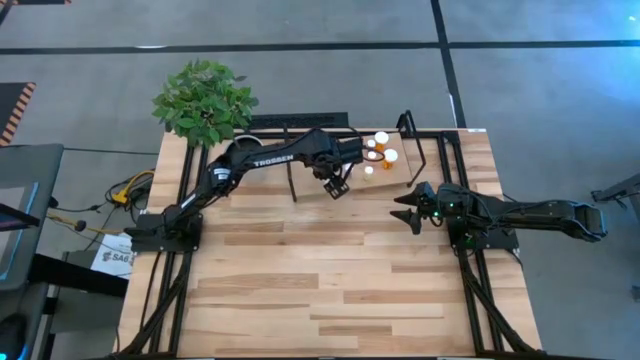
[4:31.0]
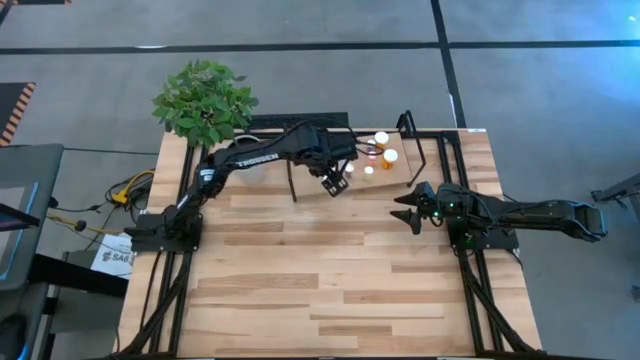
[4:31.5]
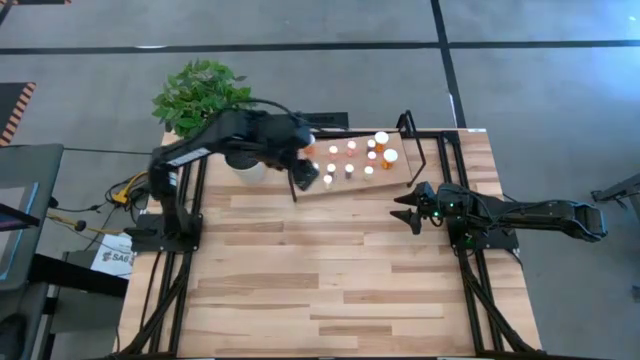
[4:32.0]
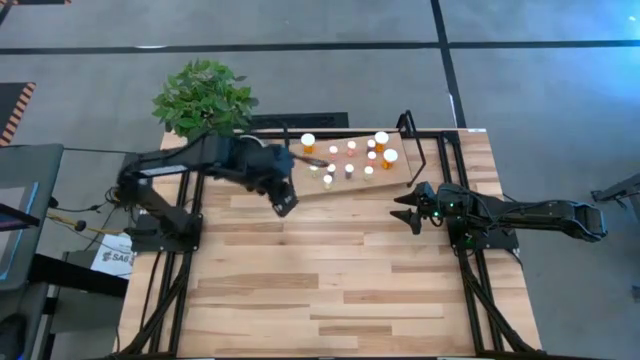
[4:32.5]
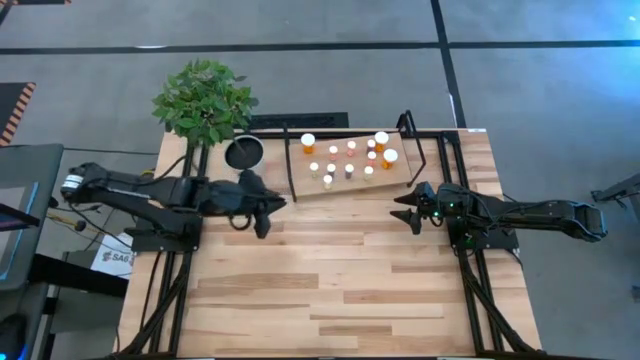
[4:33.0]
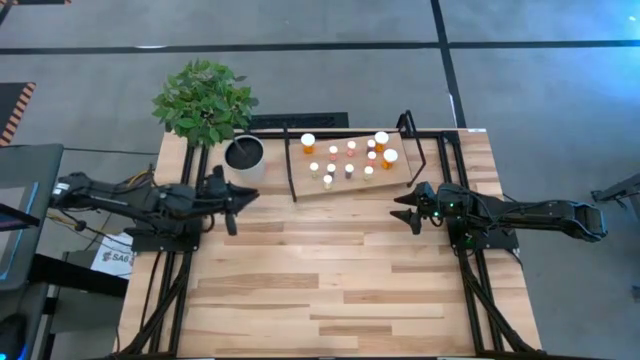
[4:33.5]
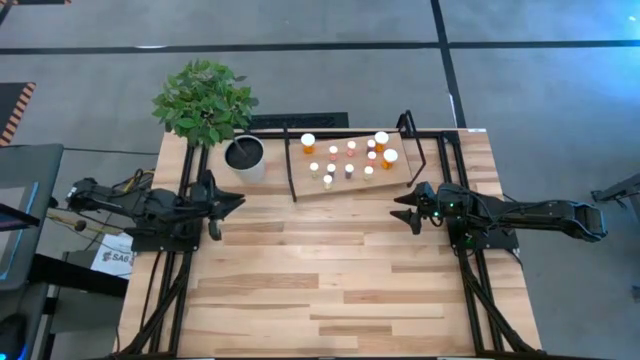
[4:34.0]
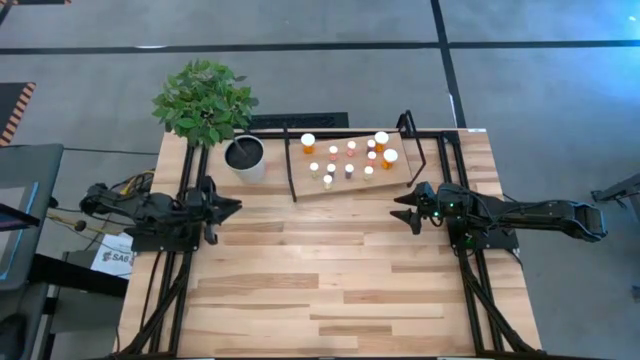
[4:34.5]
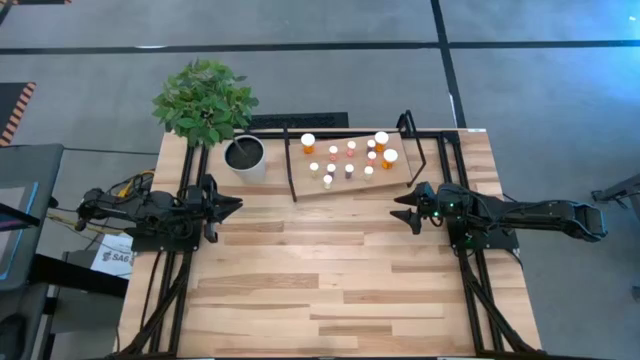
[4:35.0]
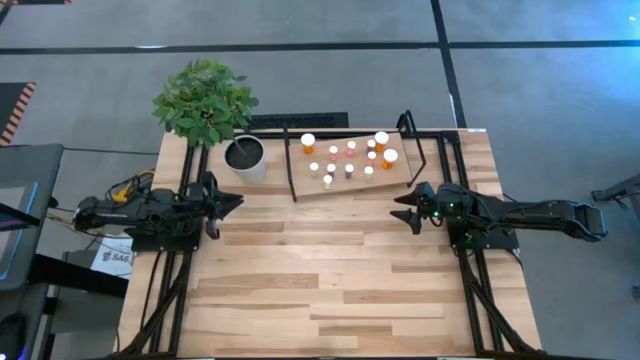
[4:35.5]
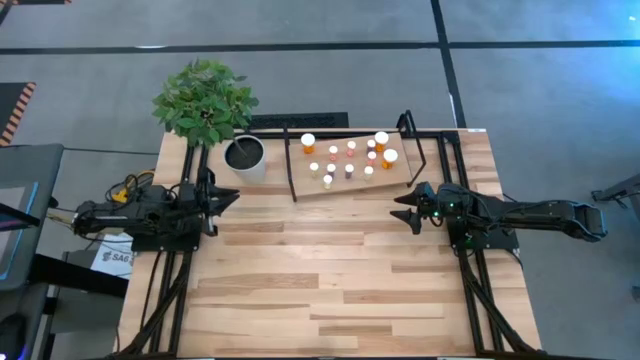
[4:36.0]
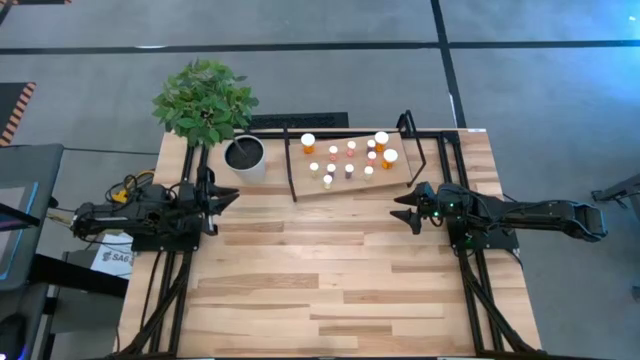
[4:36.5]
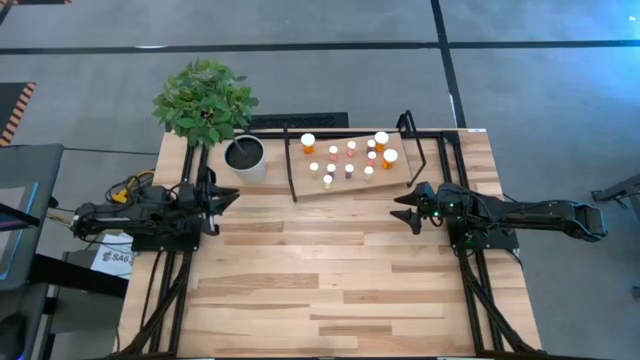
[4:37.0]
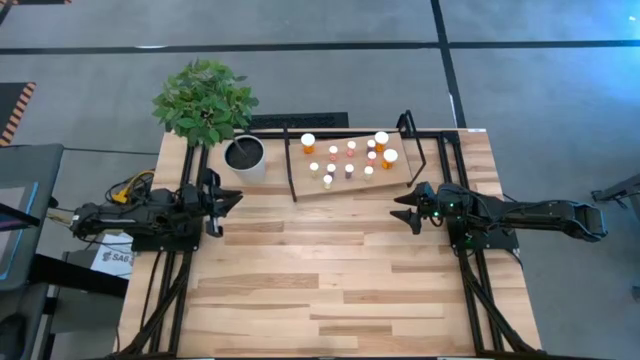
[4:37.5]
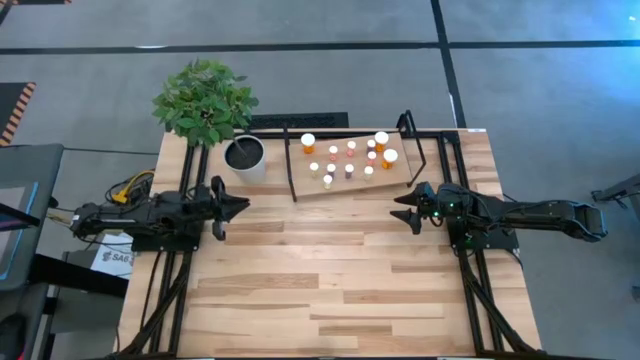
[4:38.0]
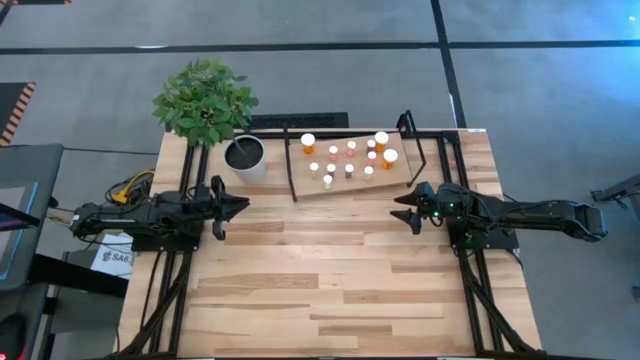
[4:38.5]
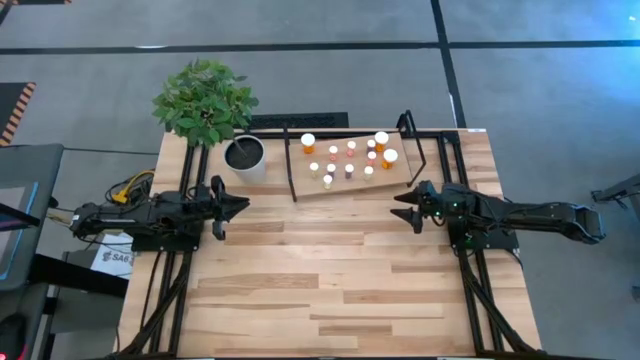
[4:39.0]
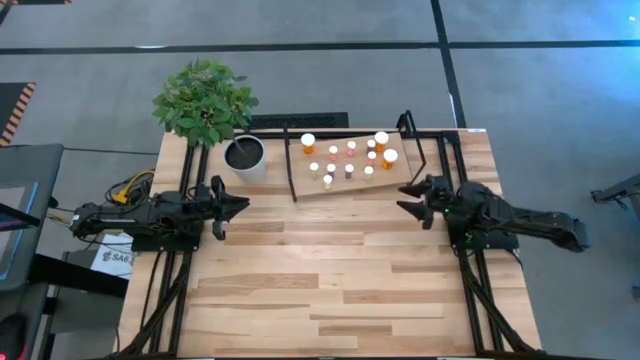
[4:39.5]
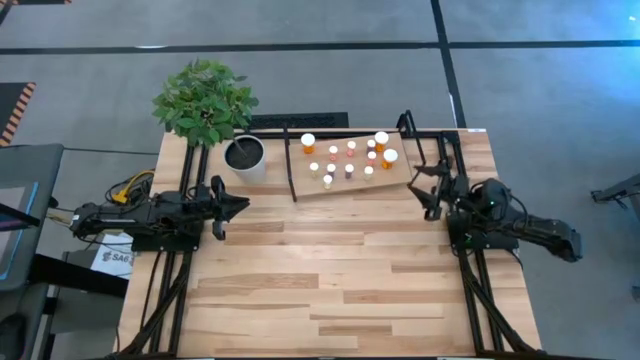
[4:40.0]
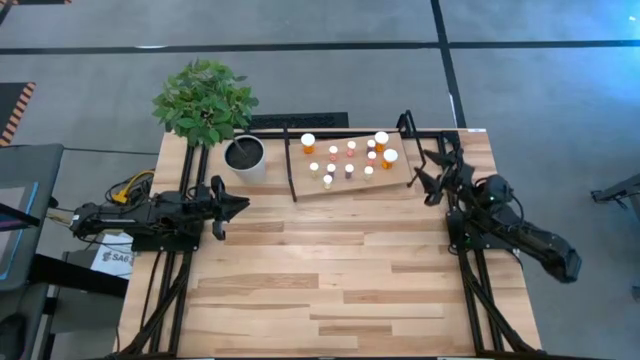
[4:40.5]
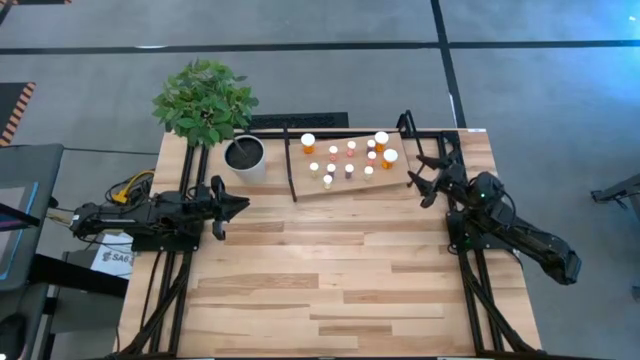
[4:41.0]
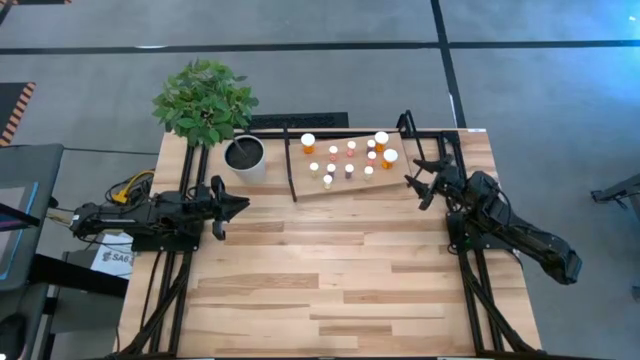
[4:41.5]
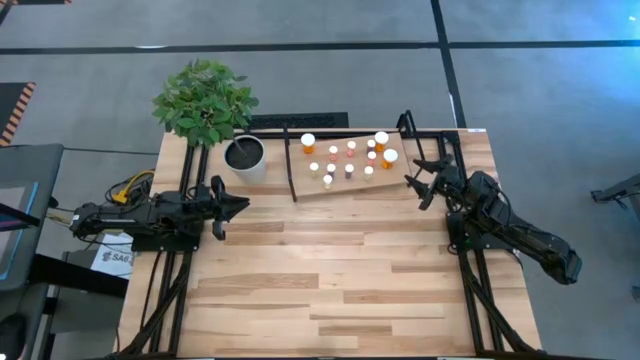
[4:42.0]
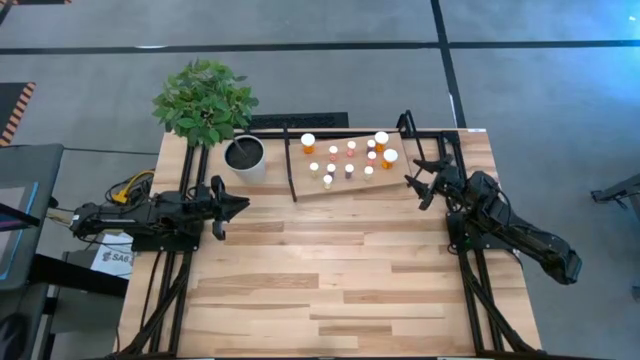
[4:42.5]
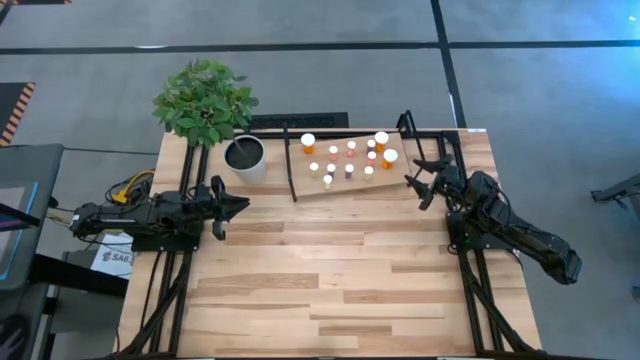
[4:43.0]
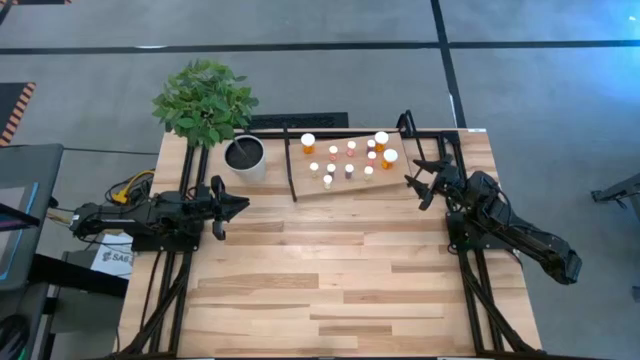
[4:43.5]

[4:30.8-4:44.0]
Task: Pick and place medicine bottles onto shelf by color
Return to Home Position

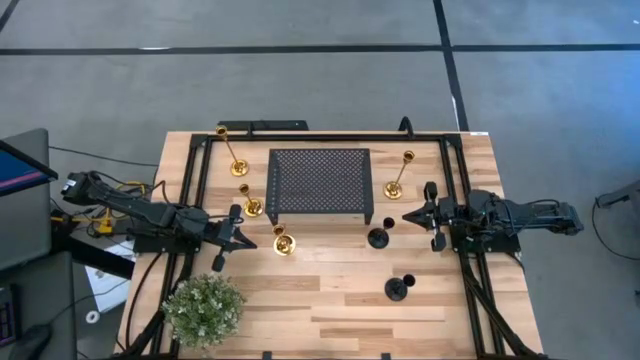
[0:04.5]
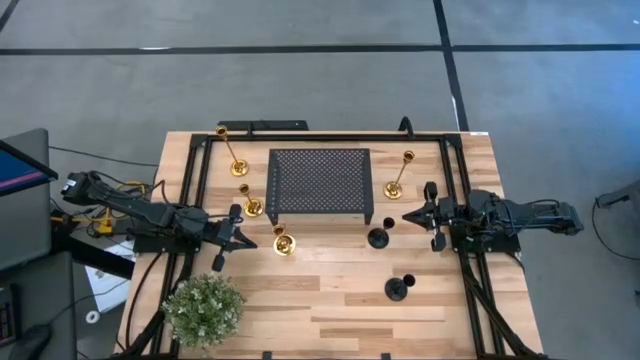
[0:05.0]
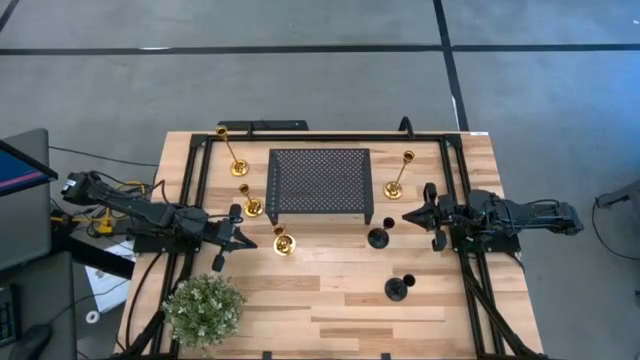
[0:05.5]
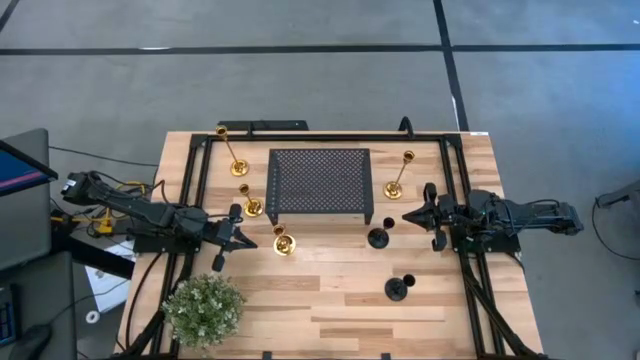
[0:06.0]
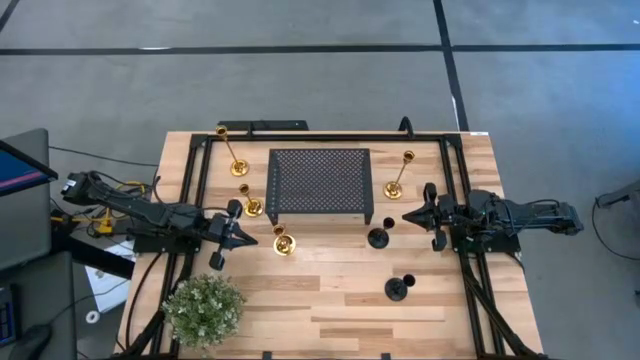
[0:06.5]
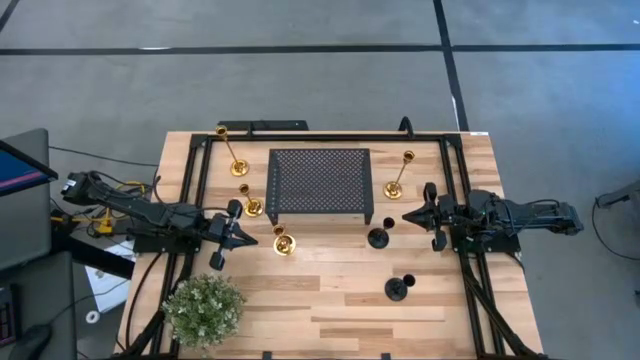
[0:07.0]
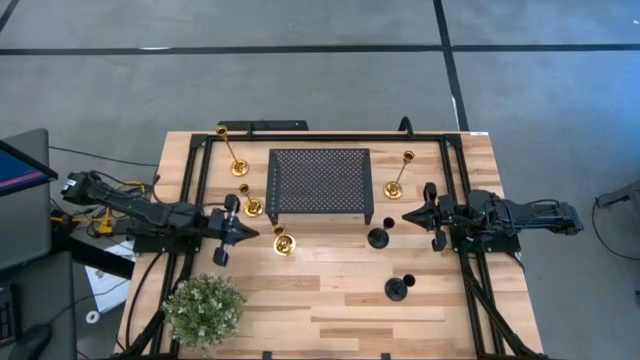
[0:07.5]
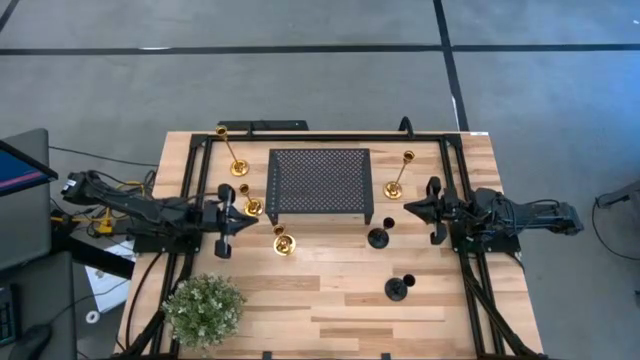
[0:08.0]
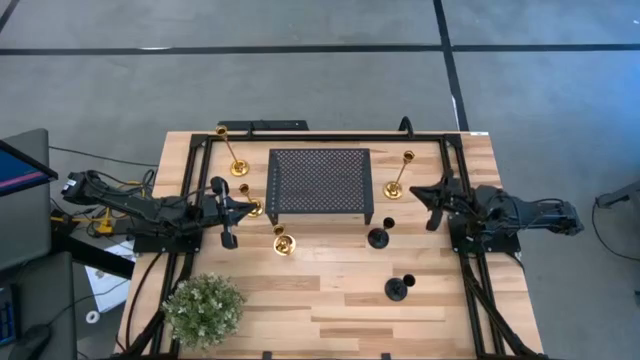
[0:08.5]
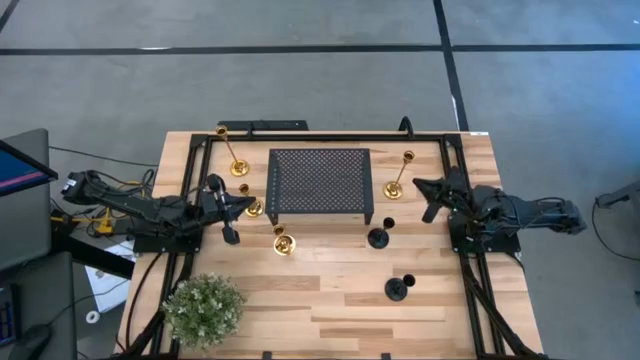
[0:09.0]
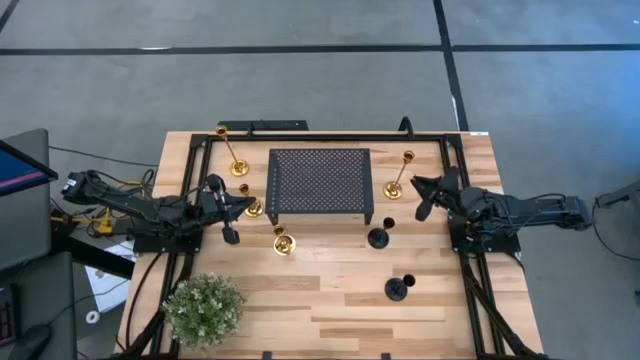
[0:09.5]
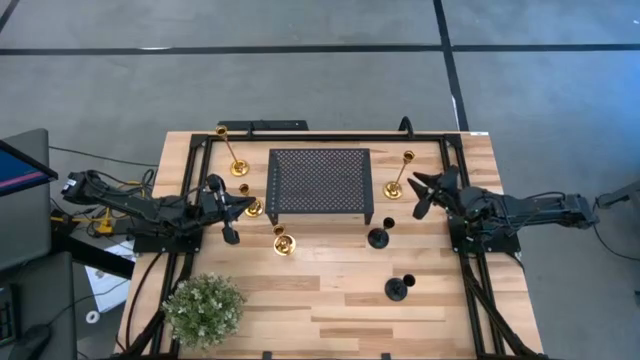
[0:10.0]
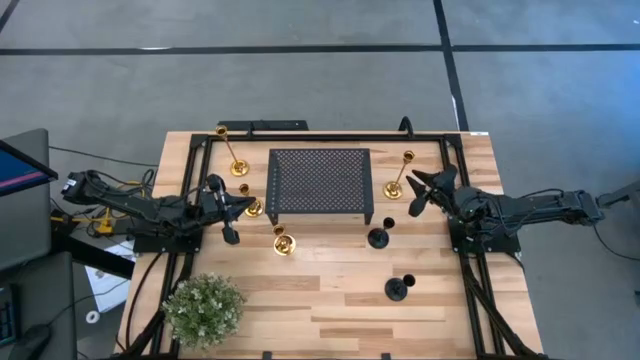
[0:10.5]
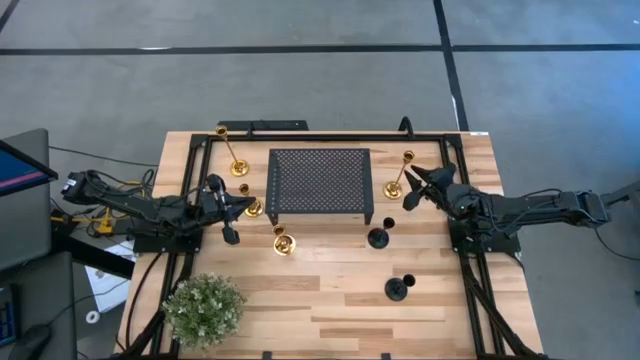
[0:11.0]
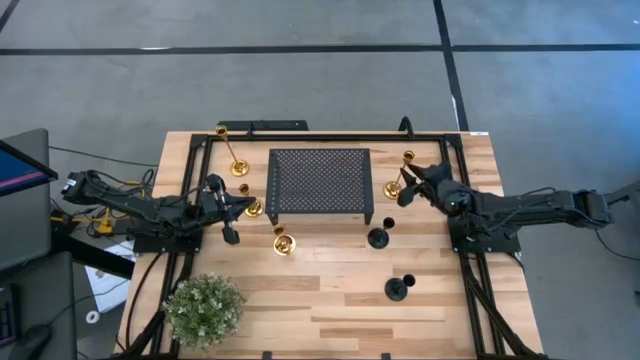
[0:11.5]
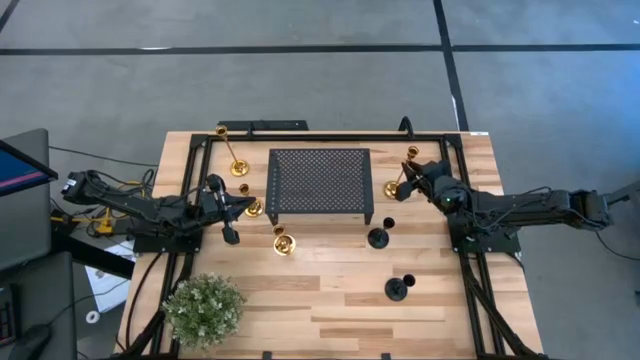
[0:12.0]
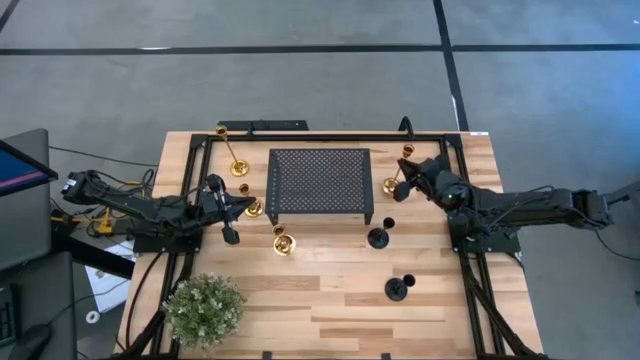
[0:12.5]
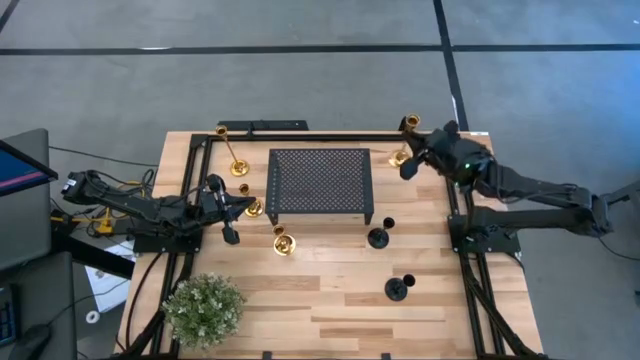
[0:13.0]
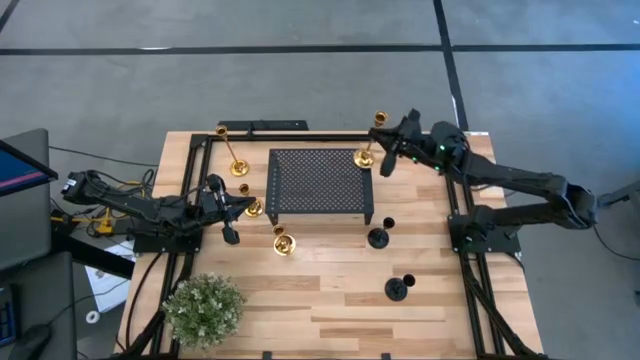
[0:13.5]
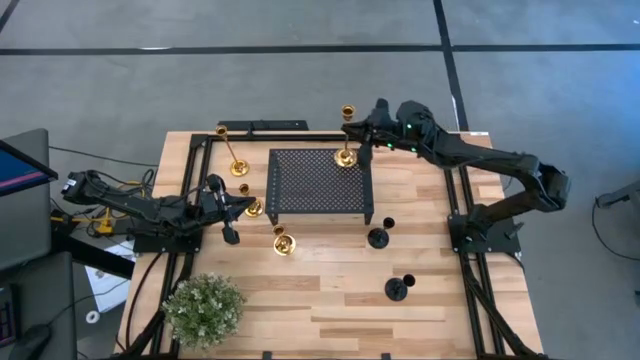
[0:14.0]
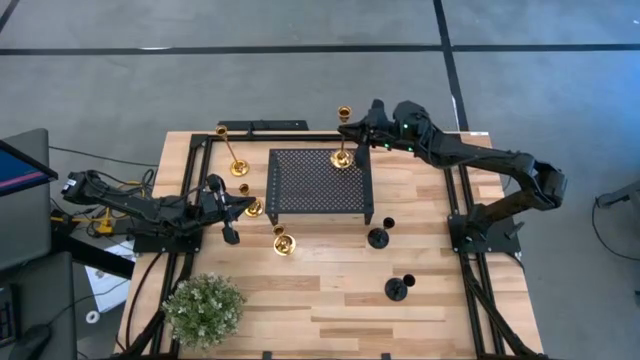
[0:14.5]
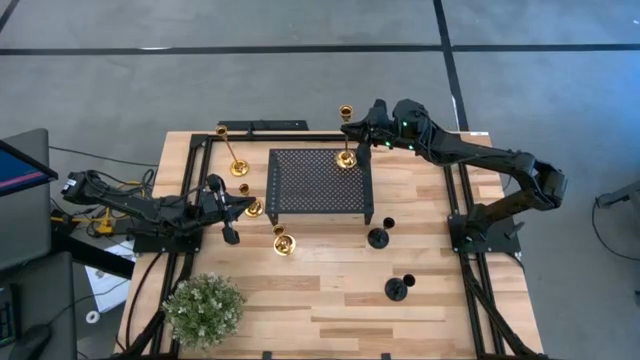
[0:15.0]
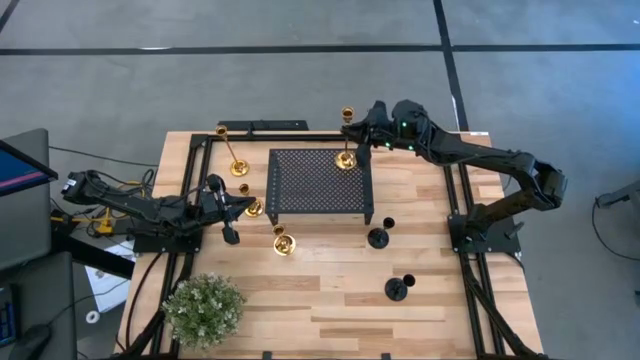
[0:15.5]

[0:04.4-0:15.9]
Task: Pick & Place candle stick holders
Put the golden candle holder on the shelf
